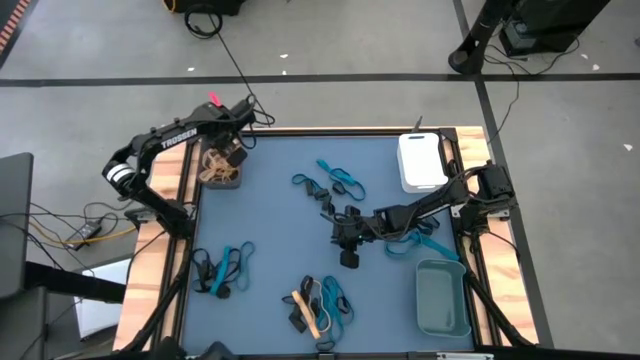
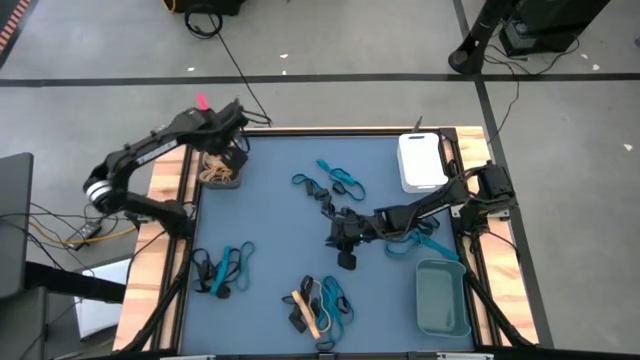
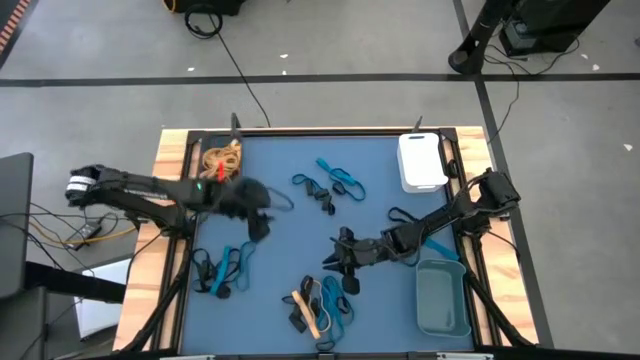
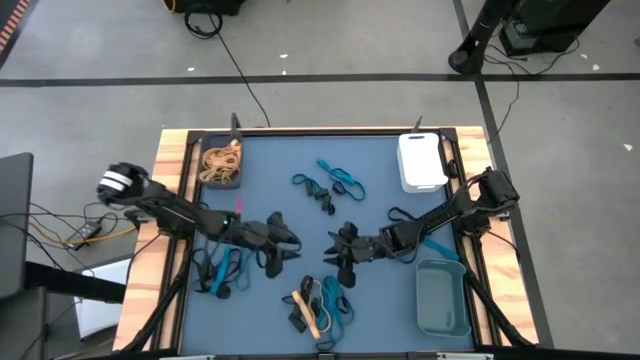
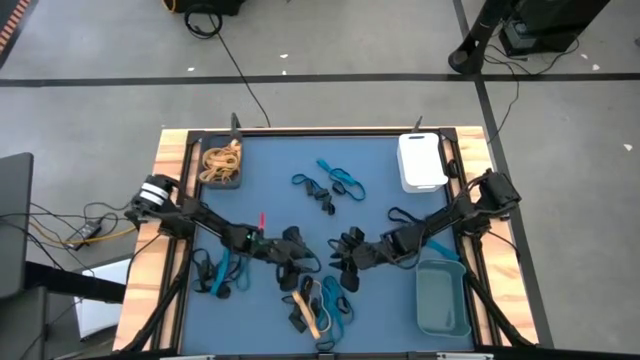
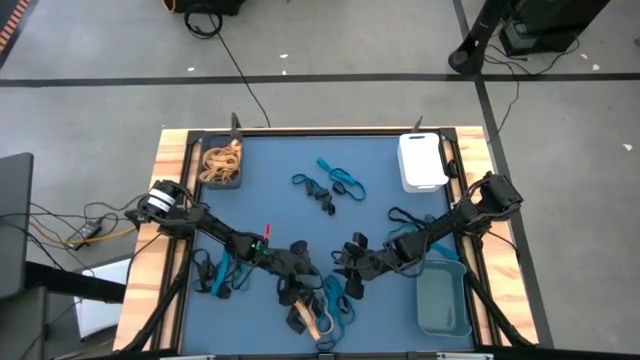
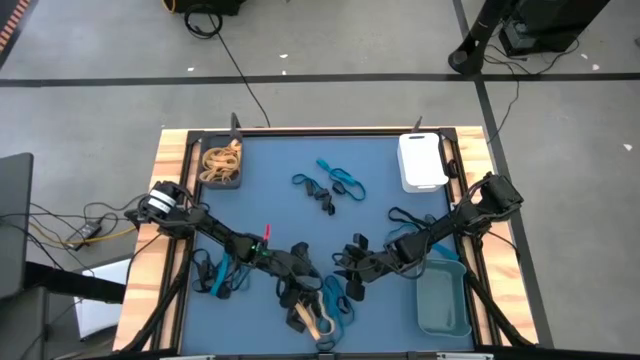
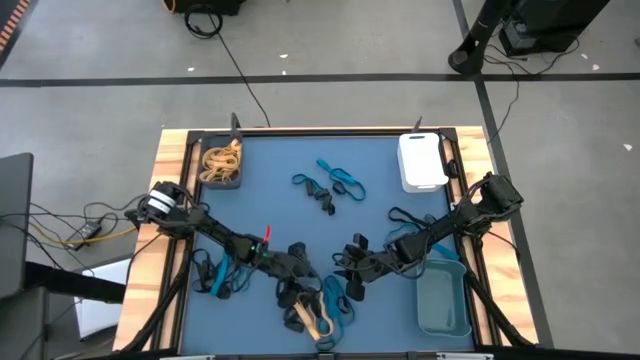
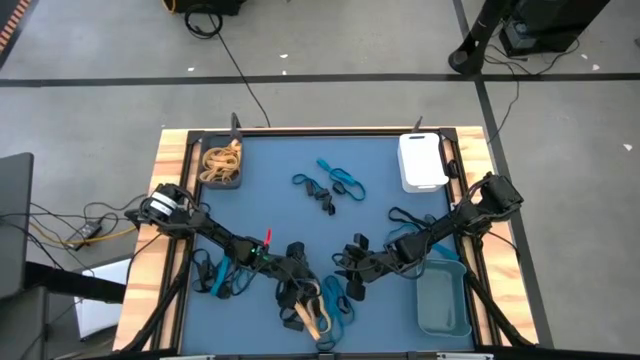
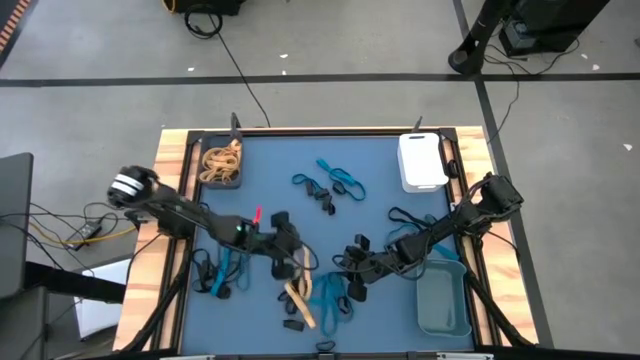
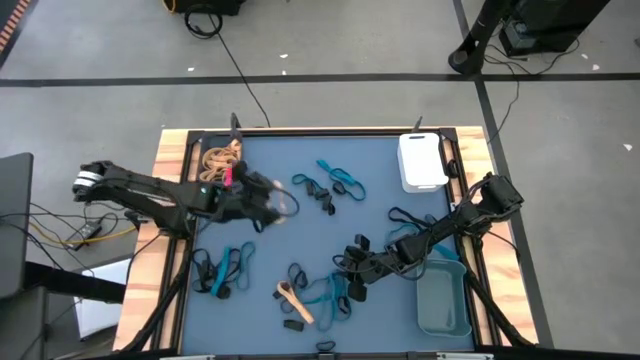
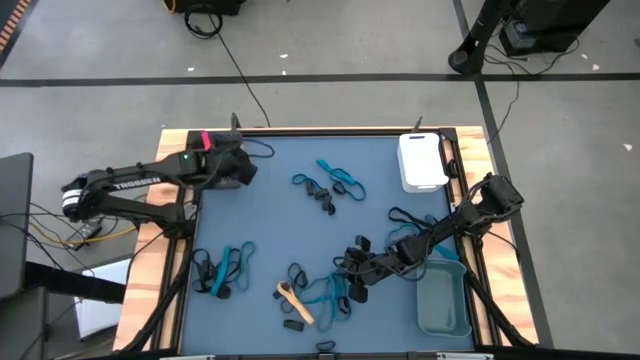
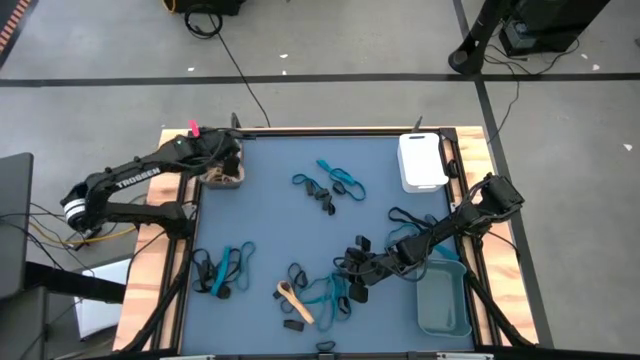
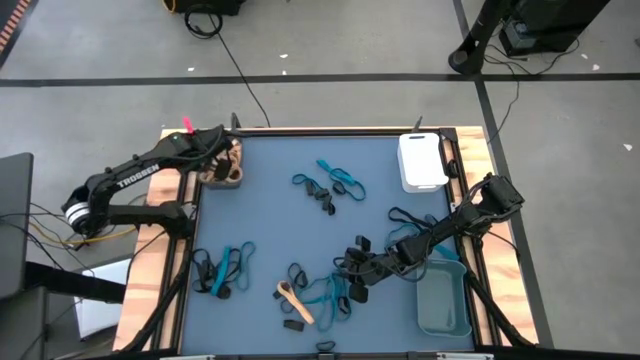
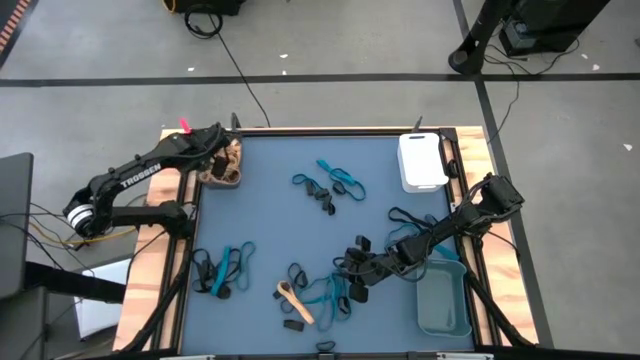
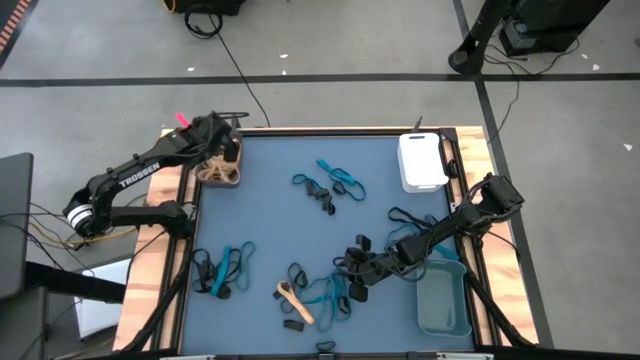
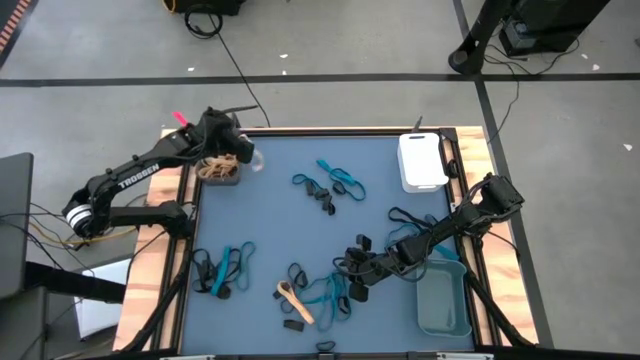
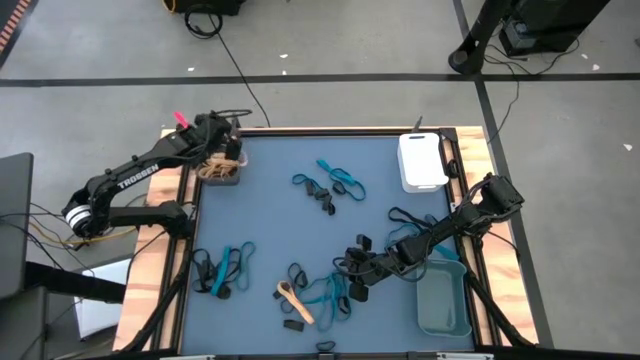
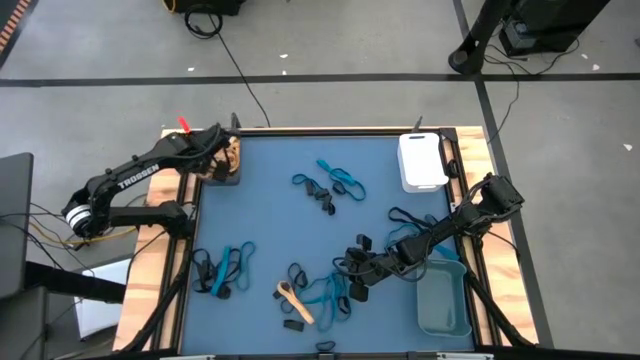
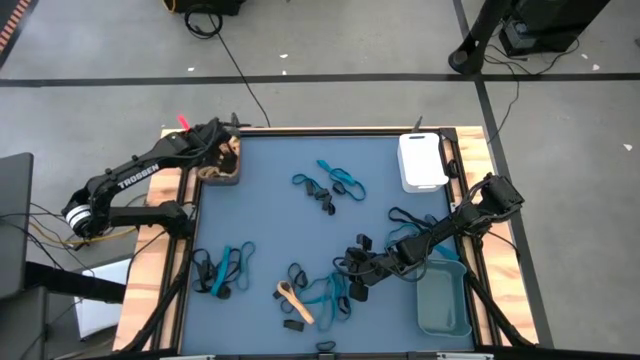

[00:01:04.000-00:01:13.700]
Task: Sort rubber bands into baskets
Put the yellow rubber band into the black bin

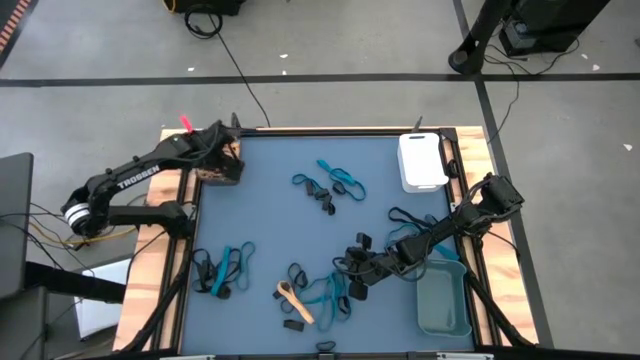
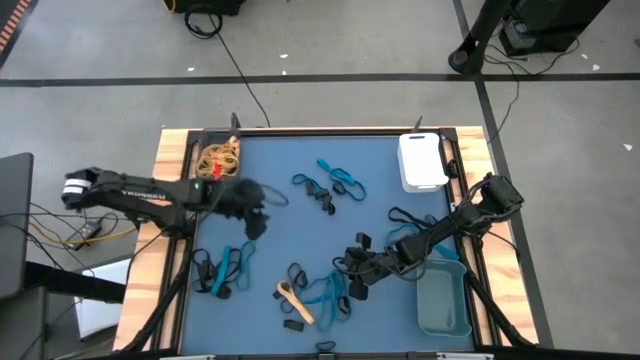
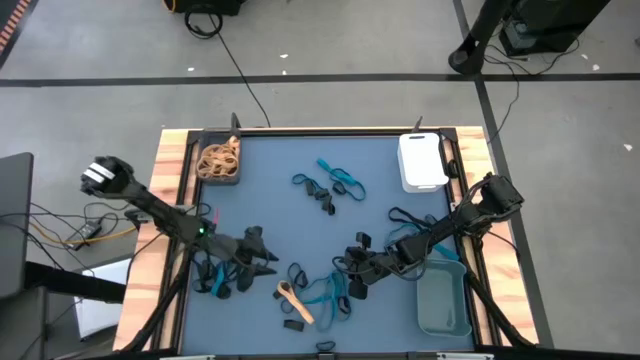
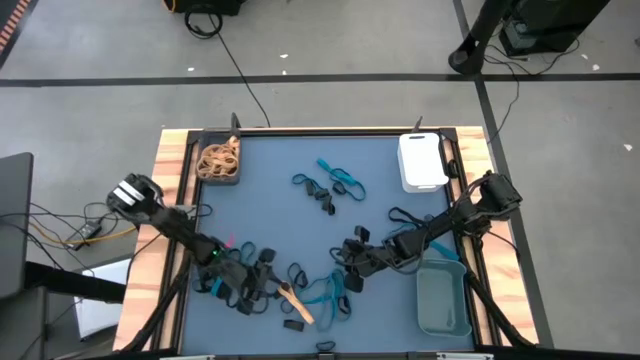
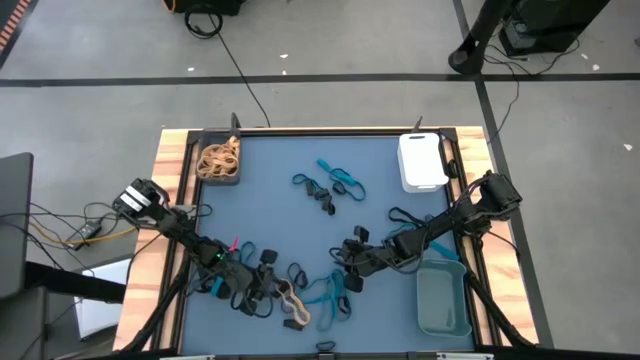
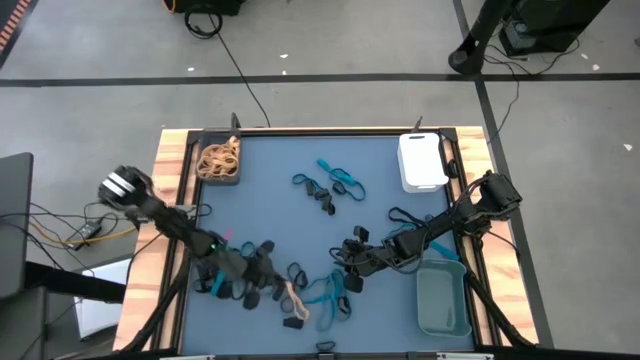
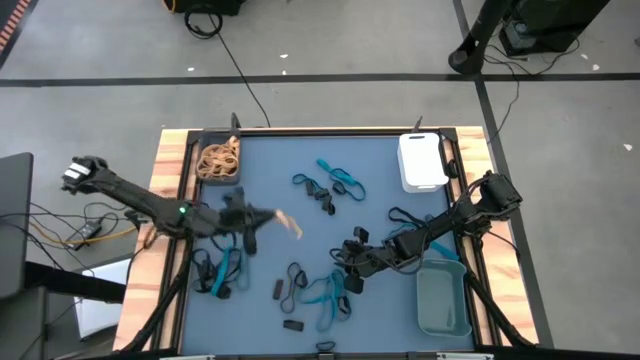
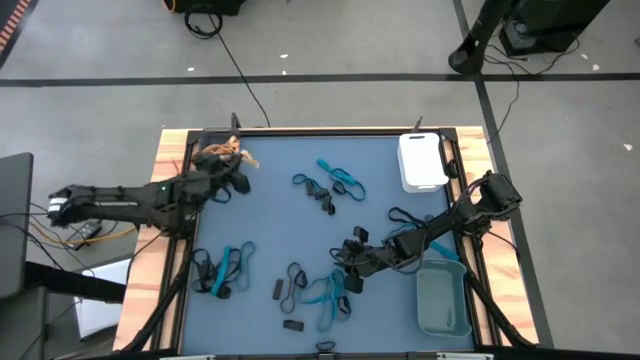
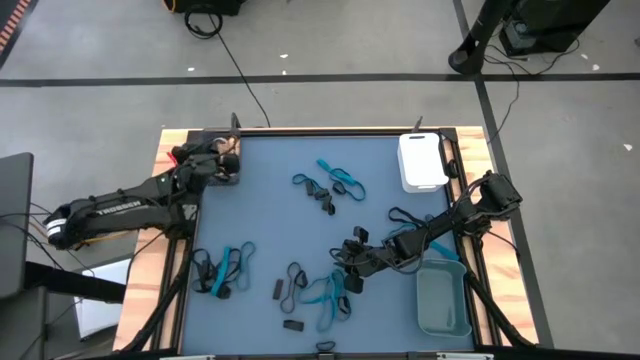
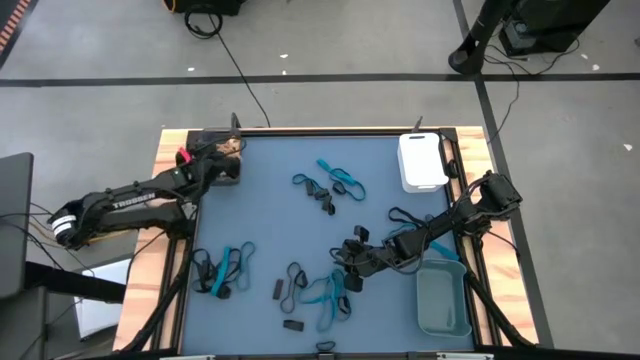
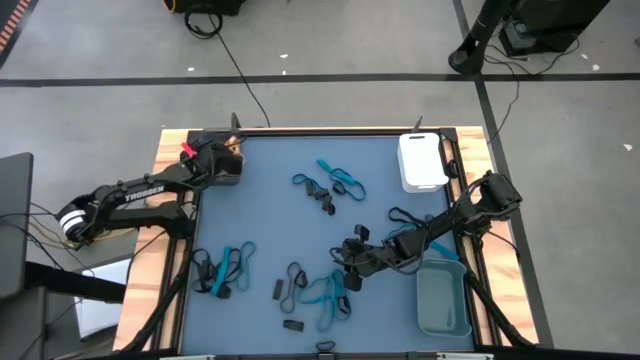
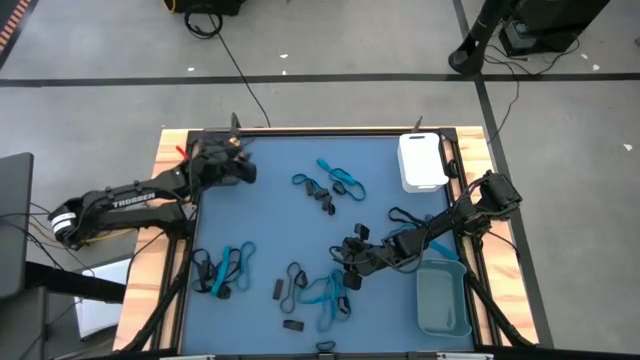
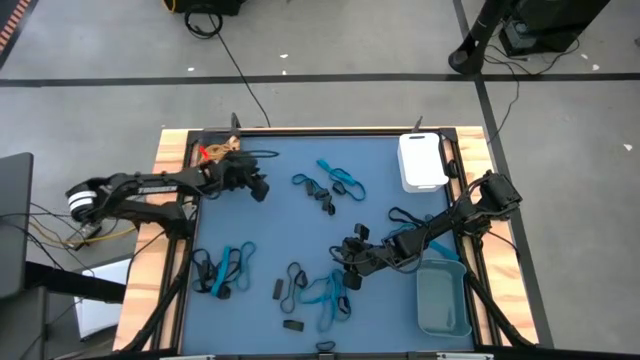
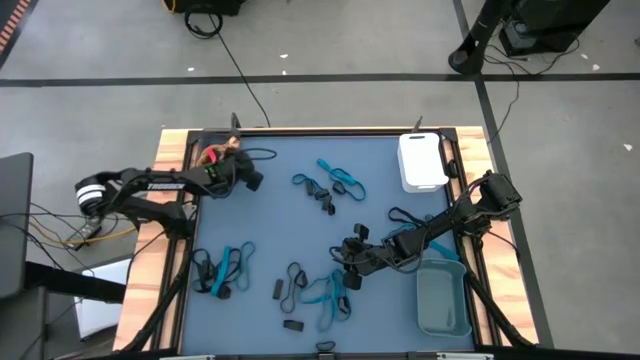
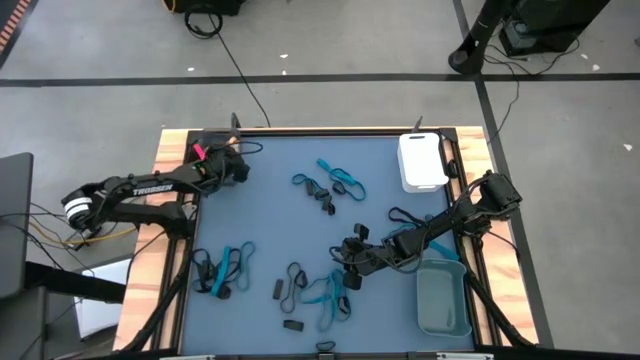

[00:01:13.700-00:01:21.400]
Put the yellow rubber band into the black bin

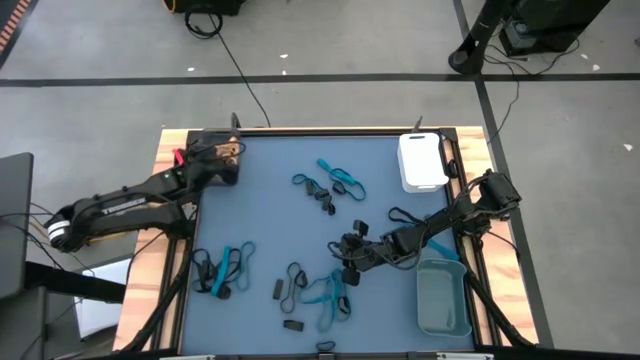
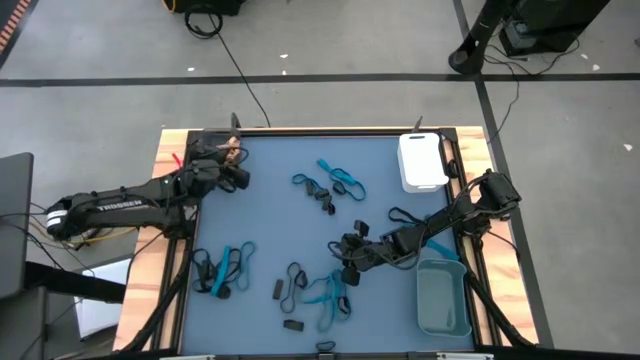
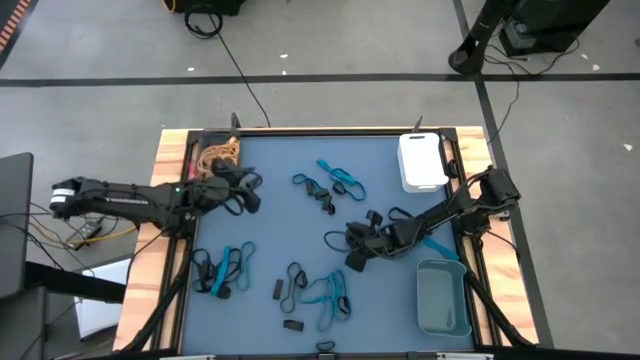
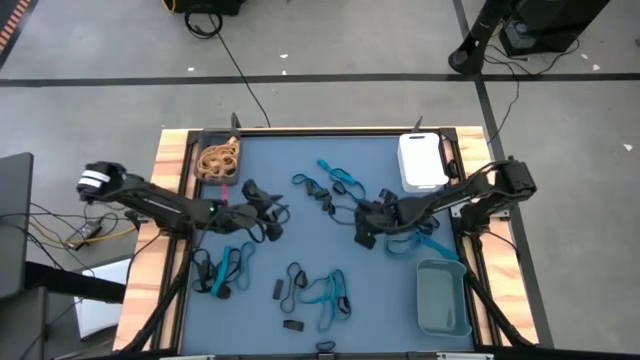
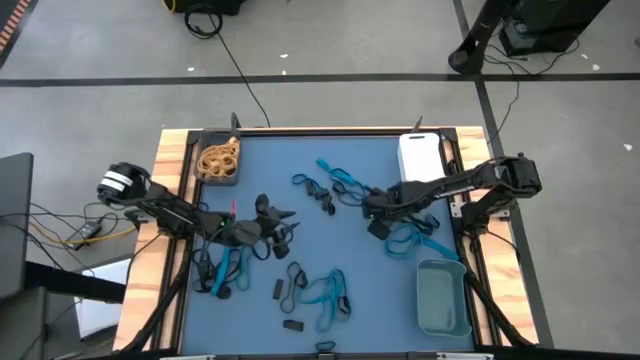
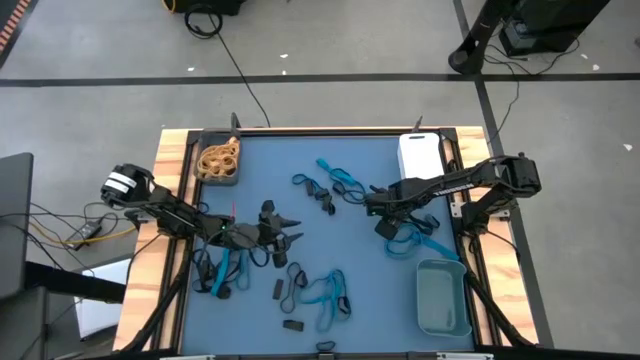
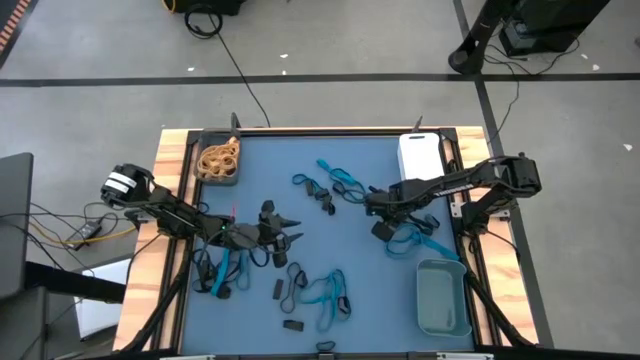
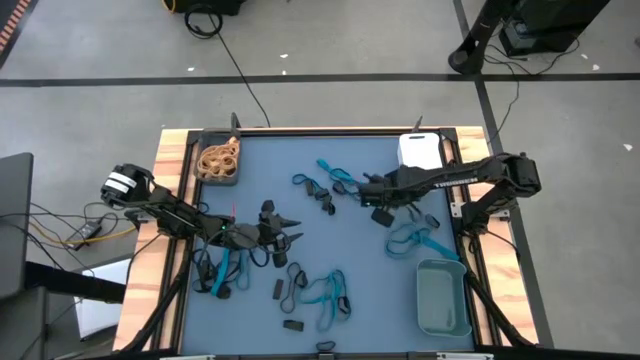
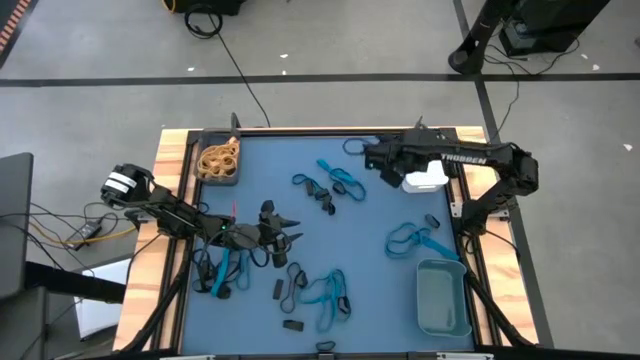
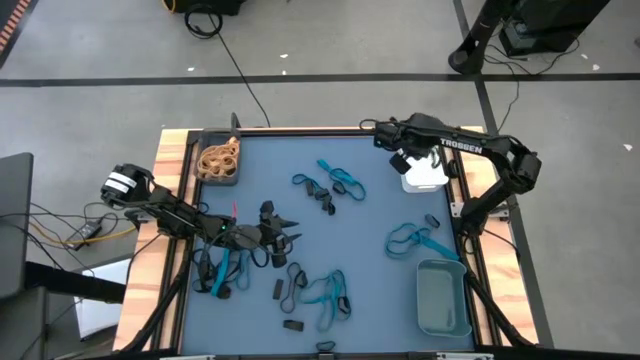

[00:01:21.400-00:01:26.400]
Put the black rubber band into the white bin
